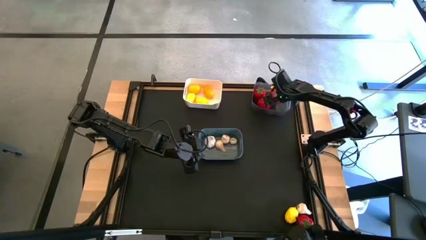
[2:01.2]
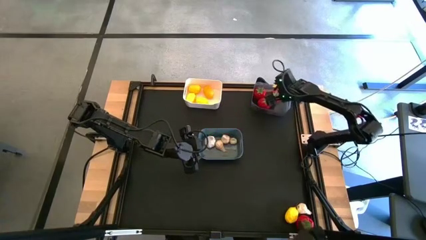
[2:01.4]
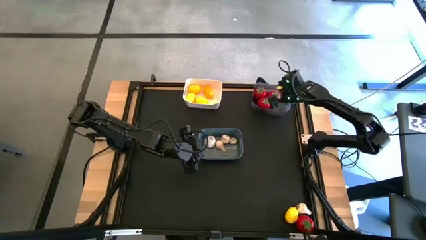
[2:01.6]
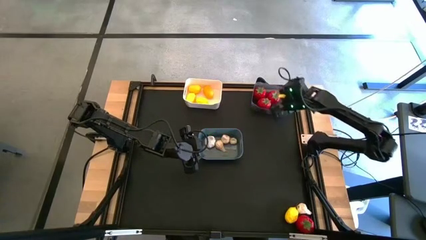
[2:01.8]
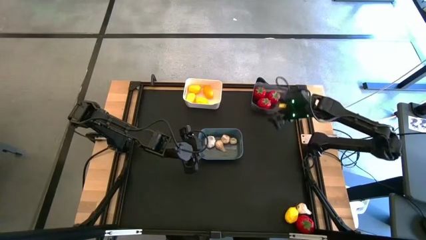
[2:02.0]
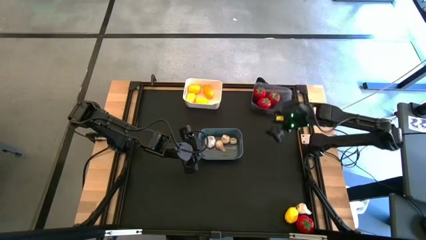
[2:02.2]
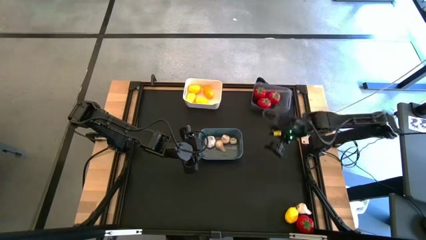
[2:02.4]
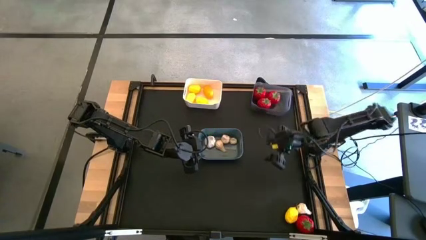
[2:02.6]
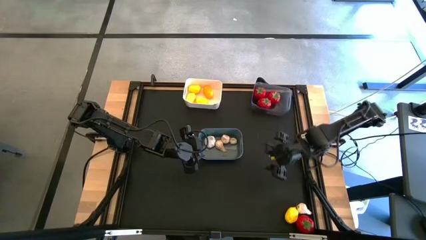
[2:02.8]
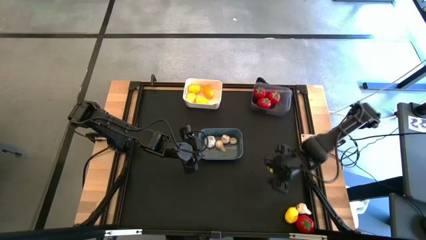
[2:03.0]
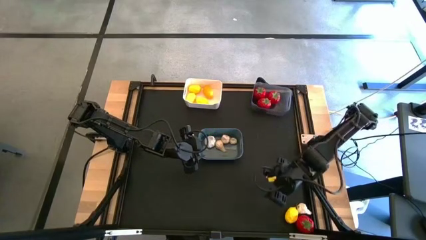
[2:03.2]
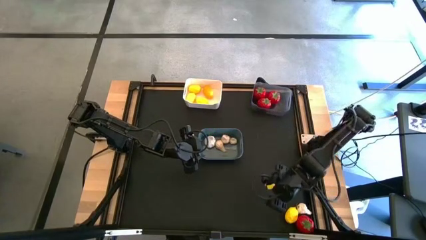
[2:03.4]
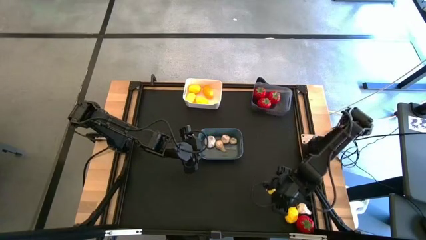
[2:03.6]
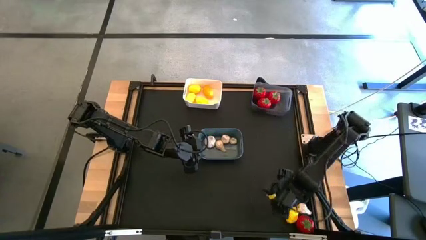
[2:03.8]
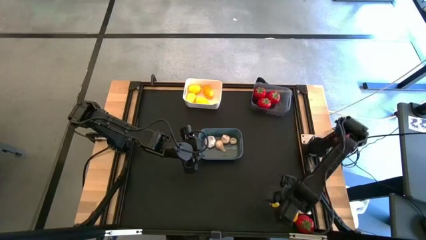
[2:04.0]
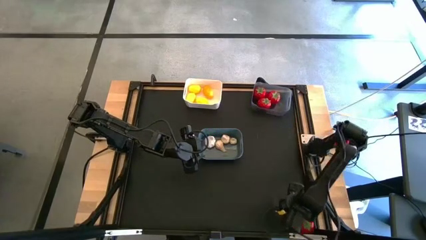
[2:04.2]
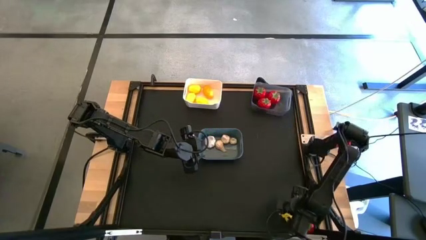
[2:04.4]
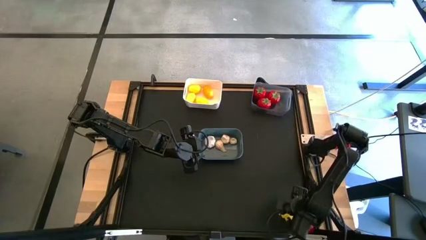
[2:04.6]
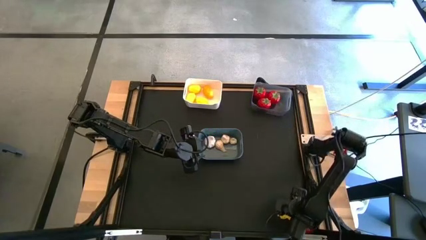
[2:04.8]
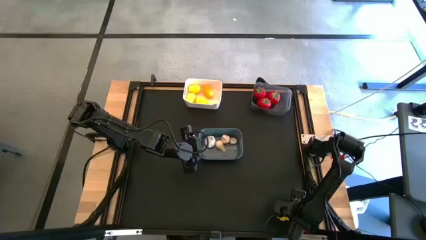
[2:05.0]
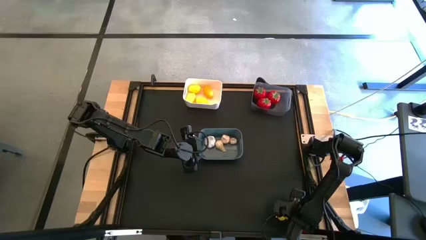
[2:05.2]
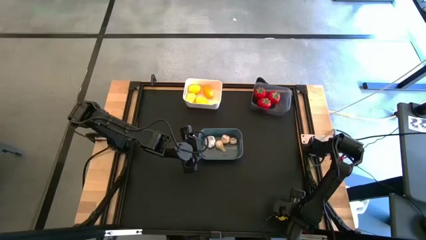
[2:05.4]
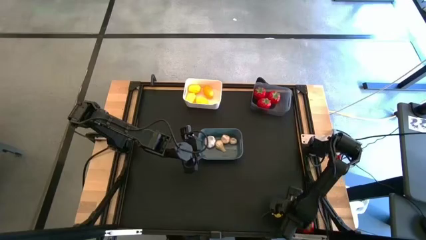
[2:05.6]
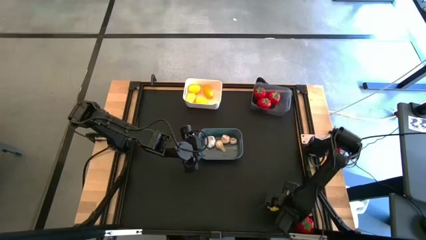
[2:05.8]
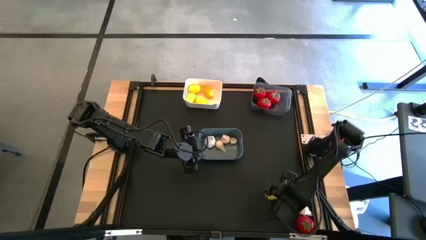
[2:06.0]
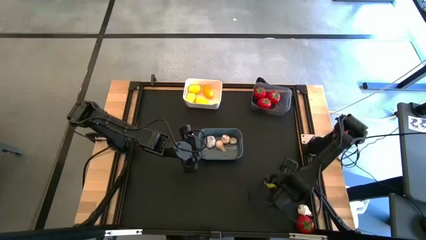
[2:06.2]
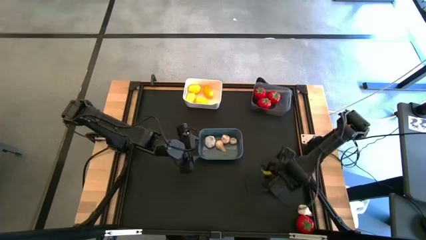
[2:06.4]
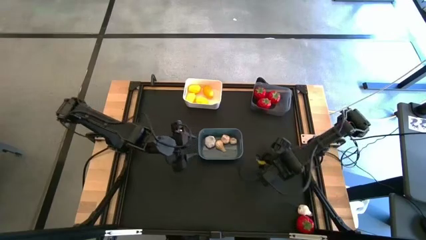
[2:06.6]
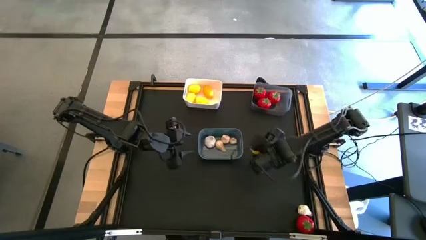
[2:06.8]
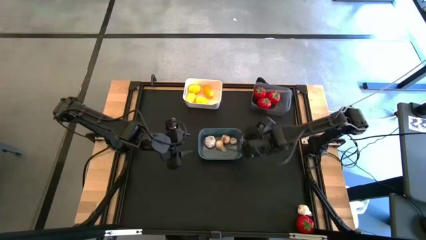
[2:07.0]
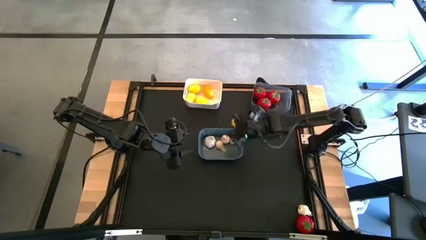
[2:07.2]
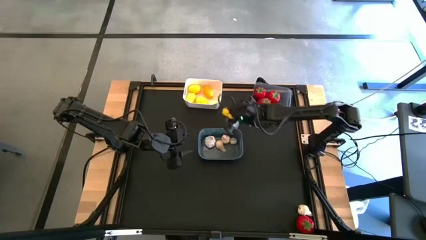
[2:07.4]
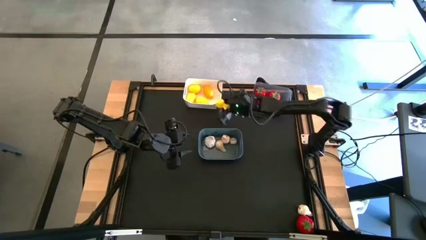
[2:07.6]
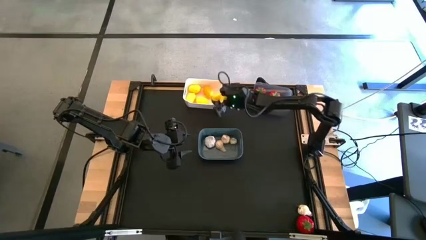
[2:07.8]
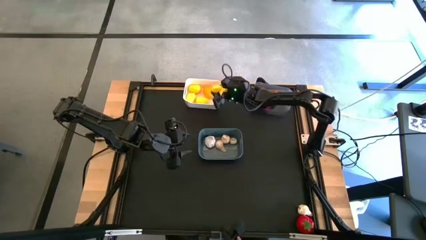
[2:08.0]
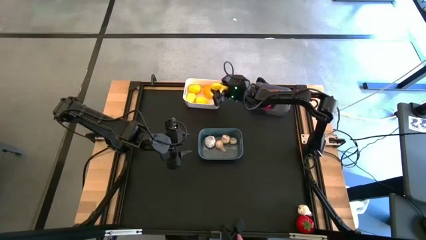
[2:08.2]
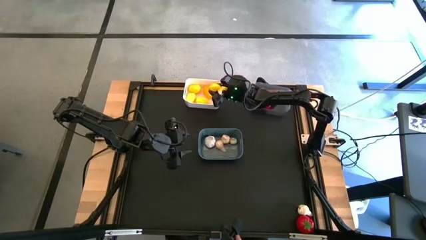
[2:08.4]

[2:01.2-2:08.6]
Task: Sort produce into baskets
Put the yellow lemon into the white bin

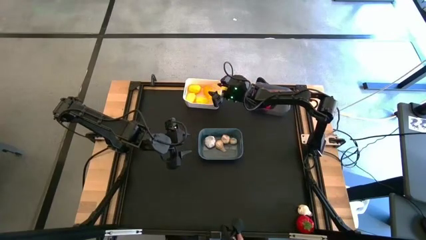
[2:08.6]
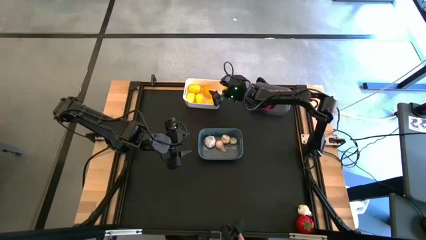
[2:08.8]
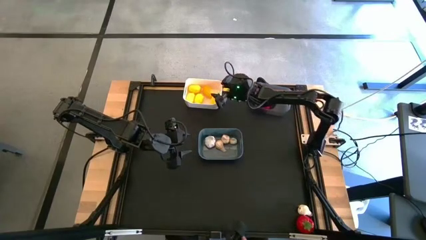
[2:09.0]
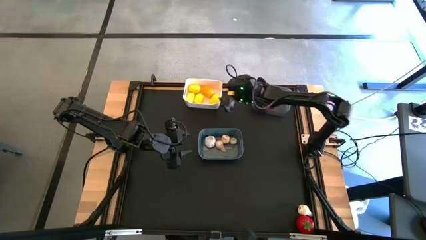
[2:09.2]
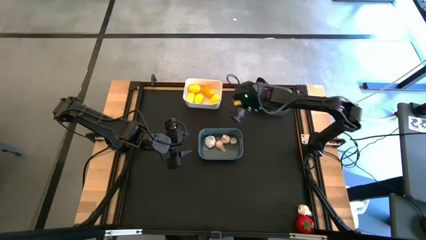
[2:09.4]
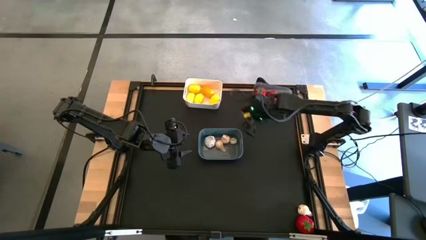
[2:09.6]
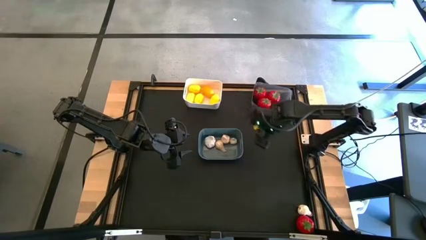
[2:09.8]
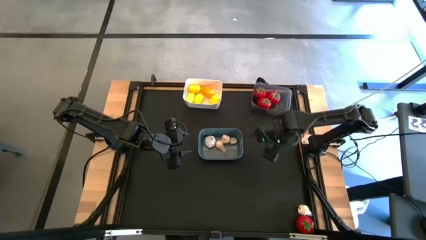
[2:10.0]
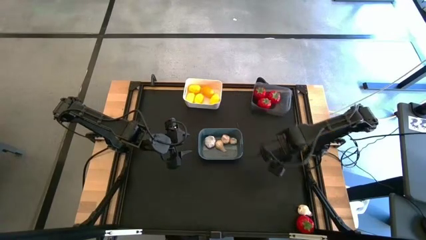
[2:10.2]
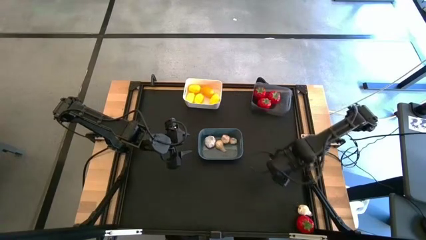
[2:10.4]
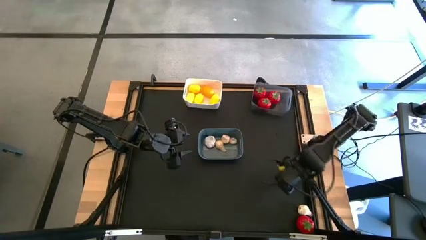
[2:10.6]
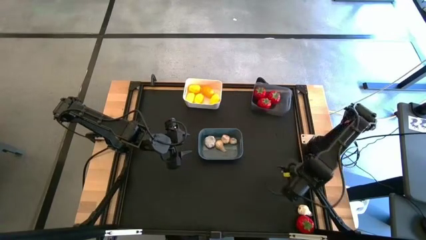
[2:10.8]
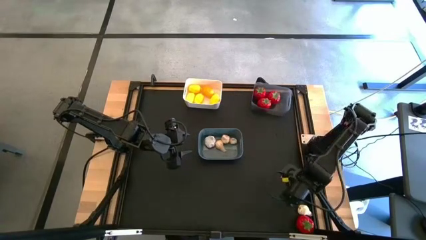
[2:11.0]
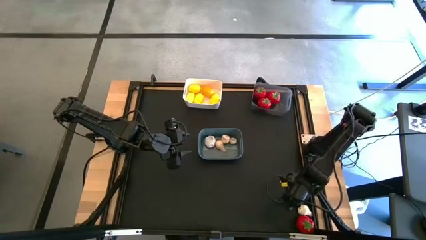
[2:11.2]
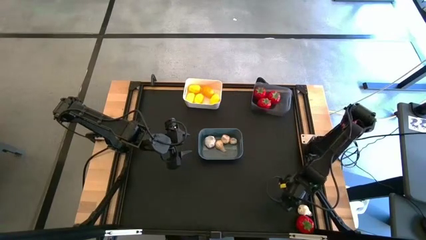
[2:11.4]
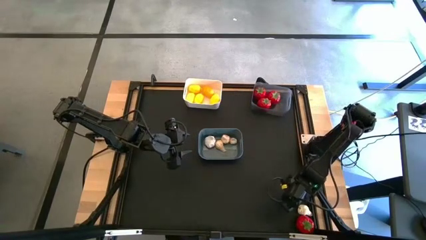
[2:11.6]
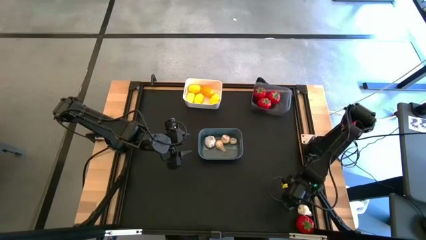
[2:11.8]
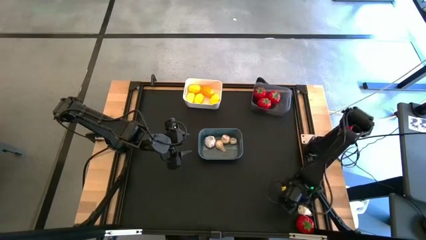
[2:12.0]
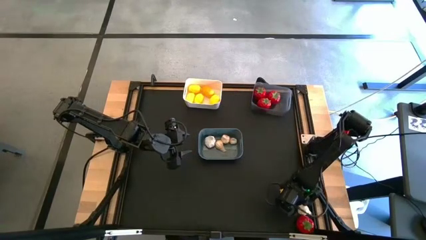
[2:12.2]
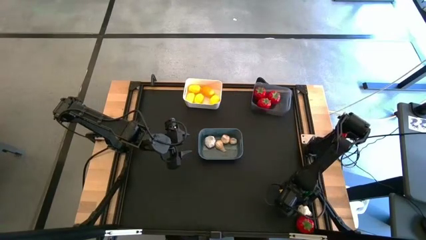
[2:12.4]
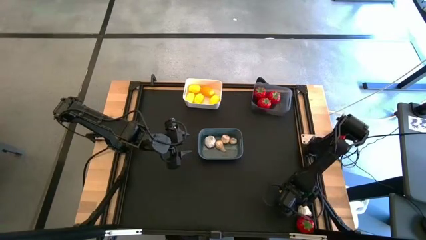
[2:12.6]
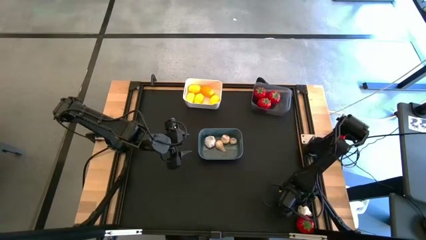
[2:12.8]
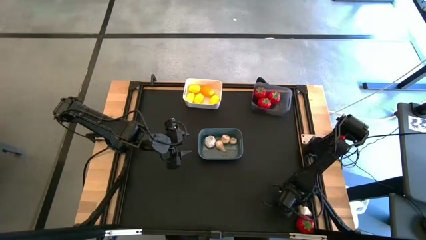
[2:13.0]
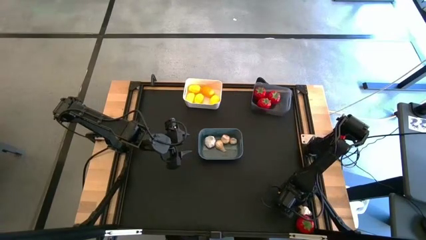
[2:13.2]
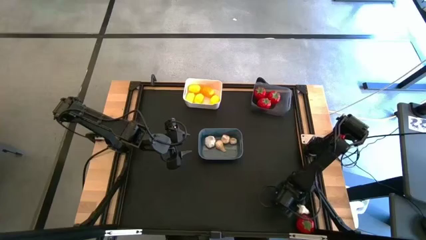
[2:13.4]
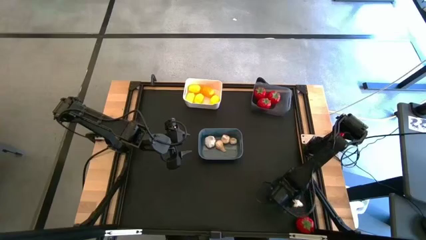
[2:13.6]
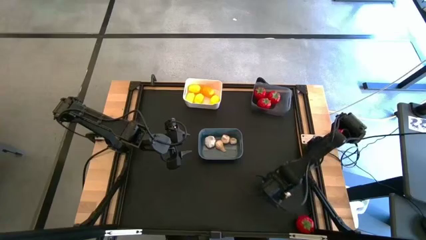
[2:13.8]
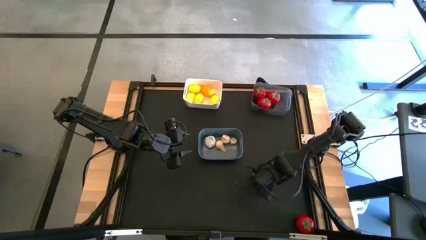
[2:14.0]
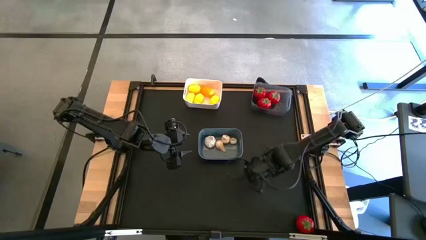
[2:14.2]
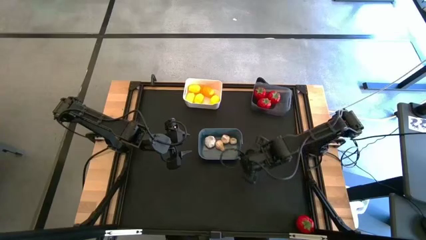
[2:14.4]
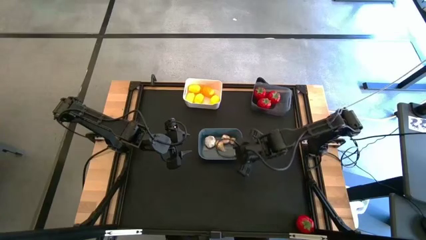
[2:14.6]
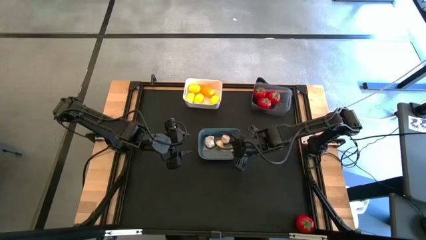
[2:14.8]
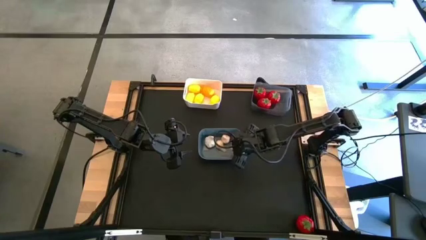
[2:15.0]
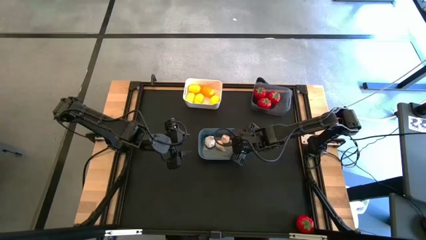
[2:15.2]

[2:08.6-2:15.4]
Put the white garlic into the blue bin

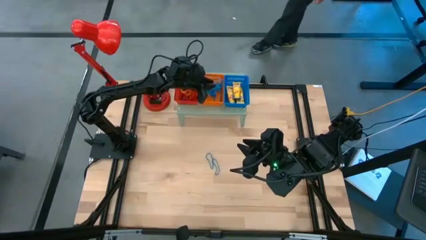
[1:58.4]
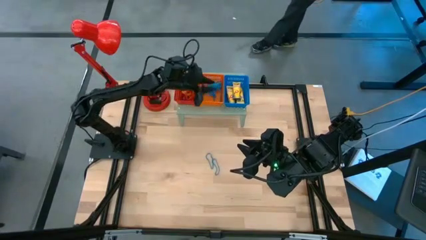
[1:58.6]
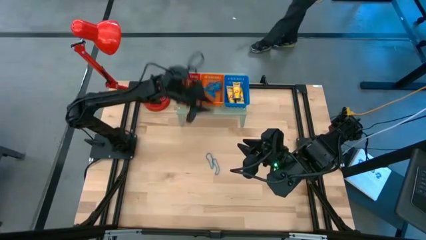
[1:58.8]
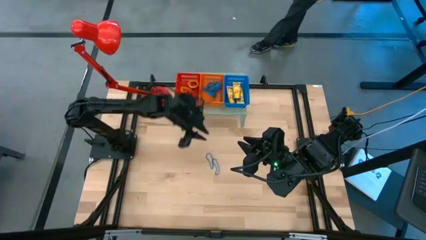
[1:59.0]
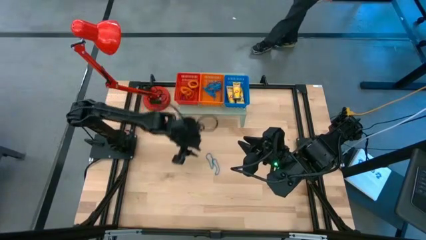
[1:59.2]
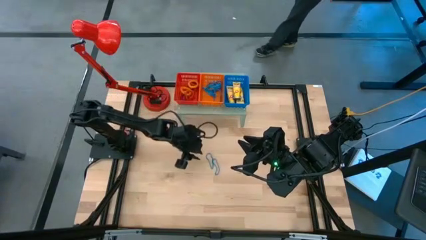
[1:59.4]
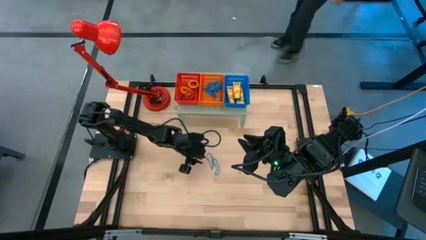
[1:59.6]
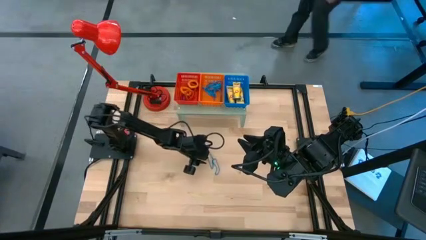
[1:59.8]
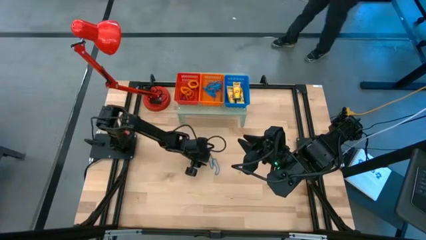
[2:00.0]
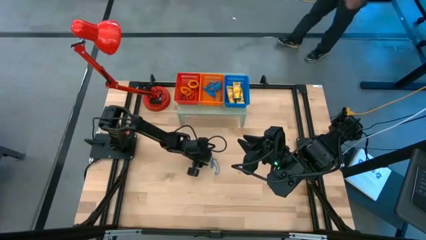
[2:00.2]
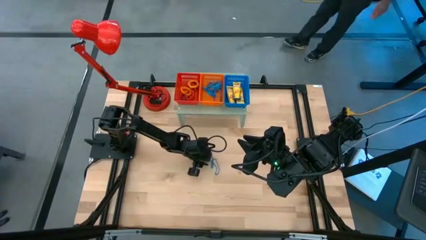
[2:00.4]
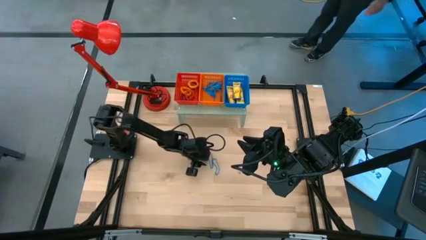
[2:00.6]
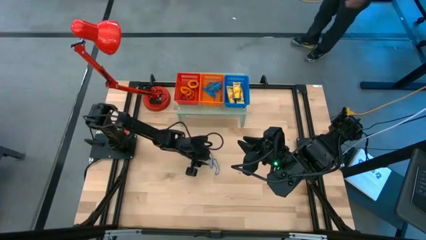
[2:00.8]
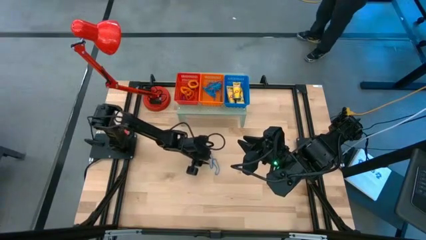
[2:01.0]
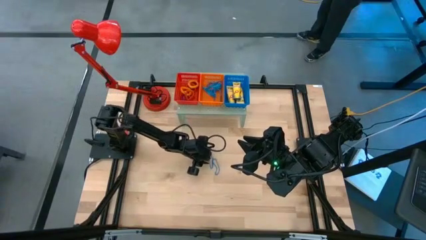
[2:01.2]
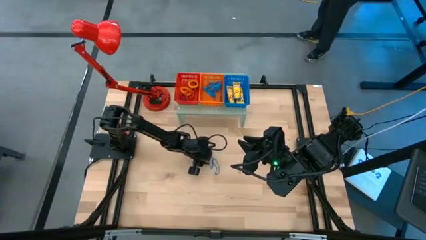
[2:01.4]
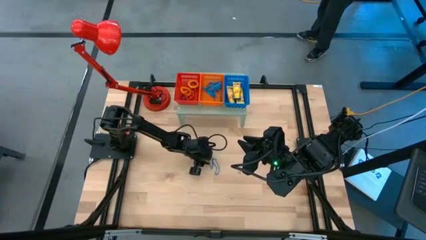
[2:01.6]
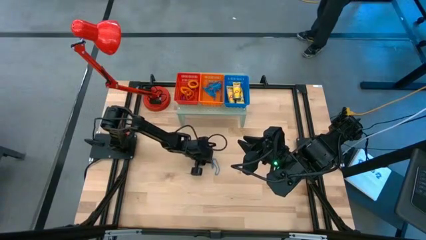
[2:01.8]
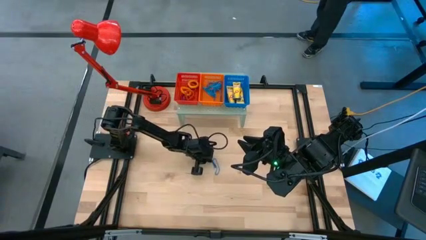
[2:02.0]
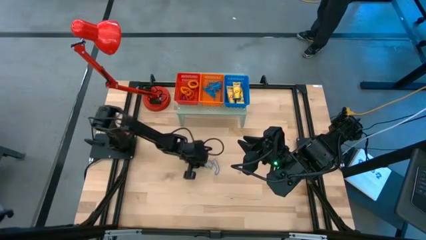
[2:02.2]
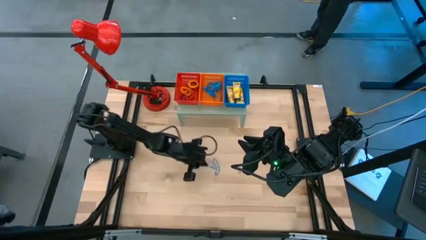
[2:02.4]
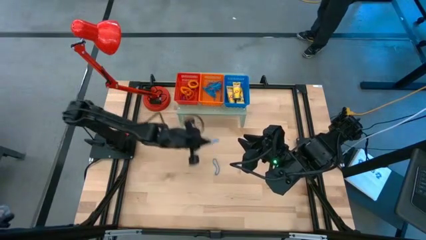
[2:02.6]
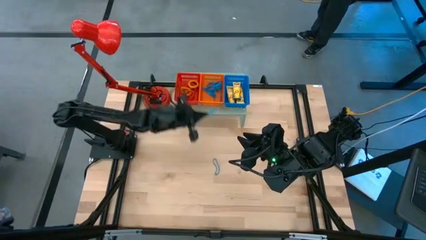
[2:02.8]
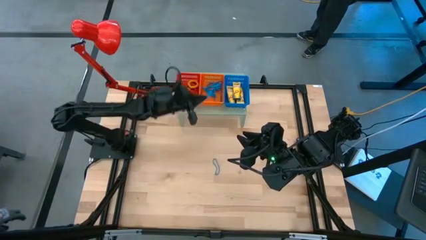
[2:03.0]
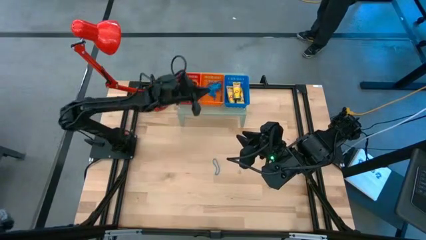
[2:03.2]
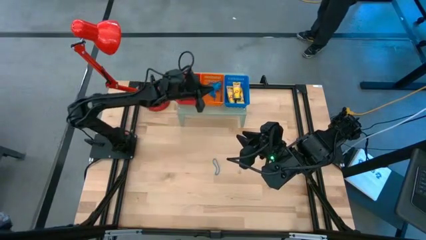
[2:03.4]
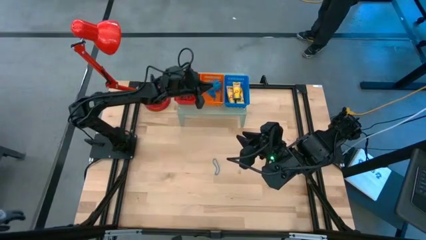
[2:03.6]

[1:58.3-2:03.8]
Task: Pick & Place Office Desk Supplies
Put the blue rubber band into the orange bin on the shelf
